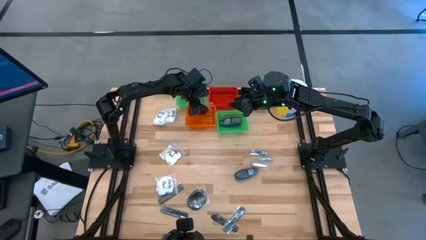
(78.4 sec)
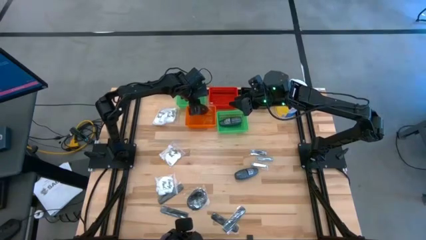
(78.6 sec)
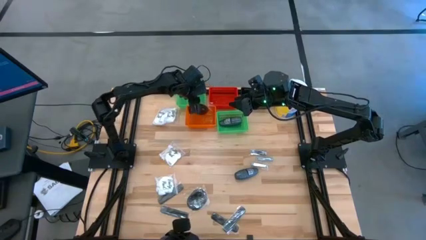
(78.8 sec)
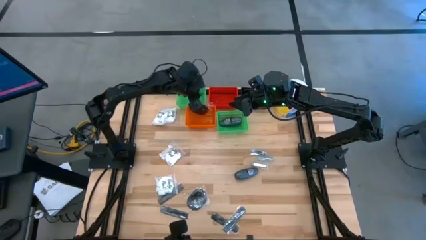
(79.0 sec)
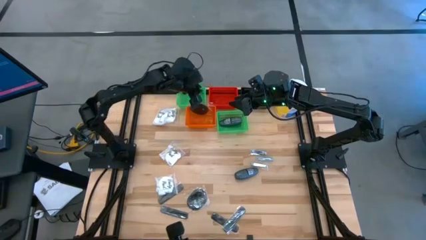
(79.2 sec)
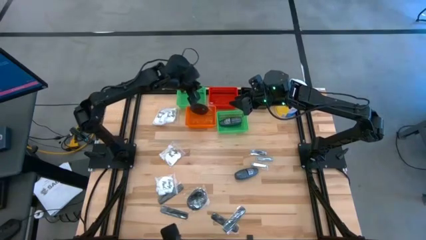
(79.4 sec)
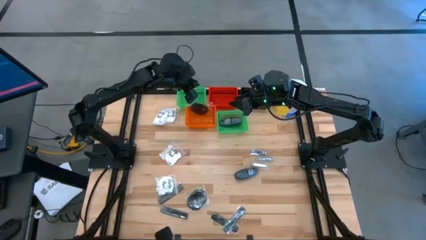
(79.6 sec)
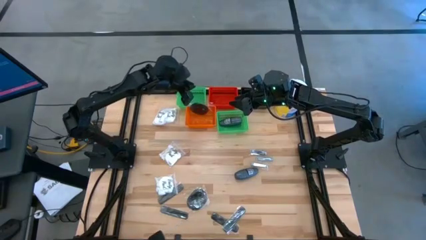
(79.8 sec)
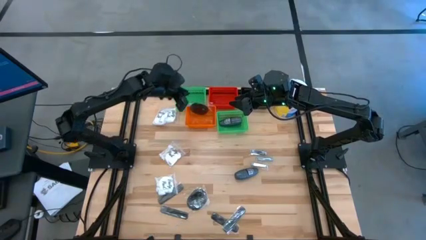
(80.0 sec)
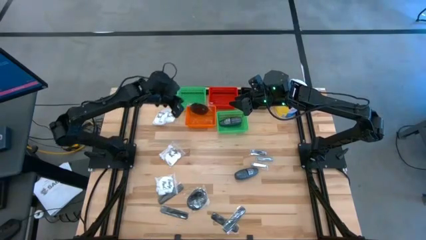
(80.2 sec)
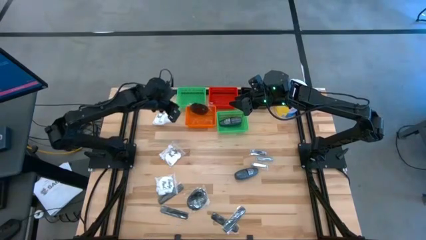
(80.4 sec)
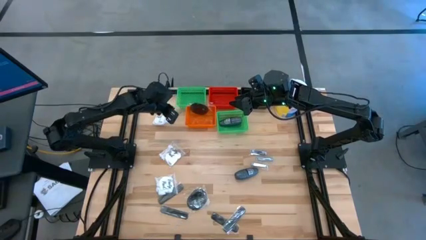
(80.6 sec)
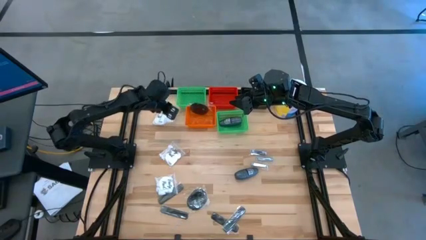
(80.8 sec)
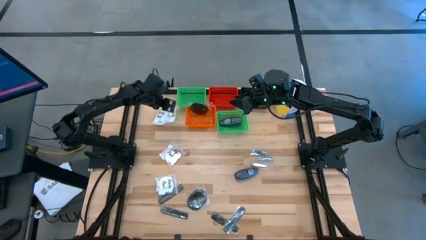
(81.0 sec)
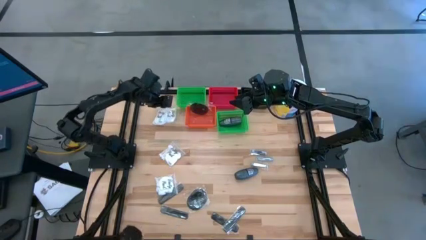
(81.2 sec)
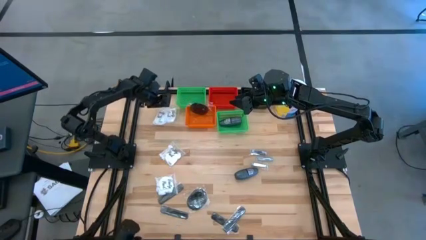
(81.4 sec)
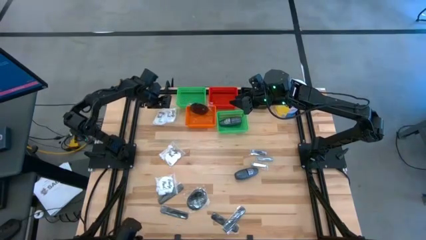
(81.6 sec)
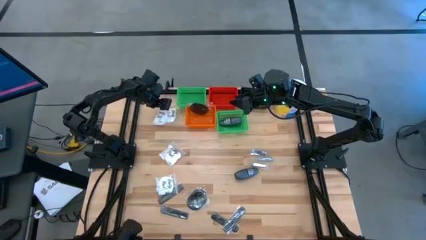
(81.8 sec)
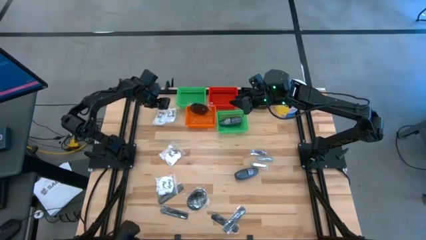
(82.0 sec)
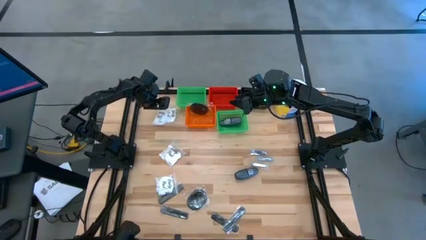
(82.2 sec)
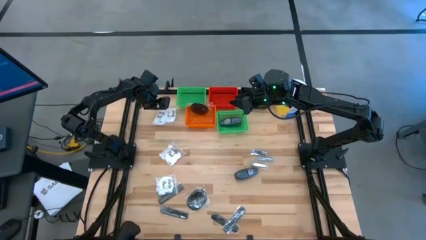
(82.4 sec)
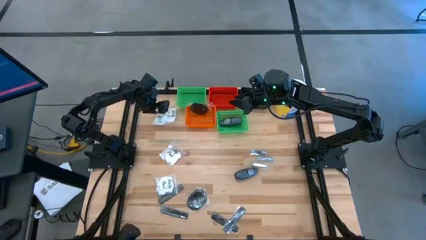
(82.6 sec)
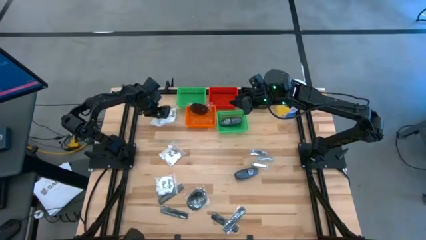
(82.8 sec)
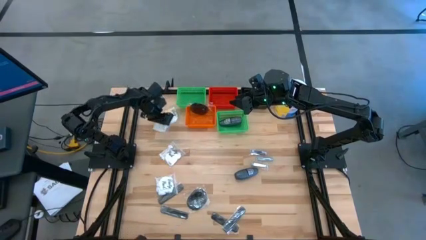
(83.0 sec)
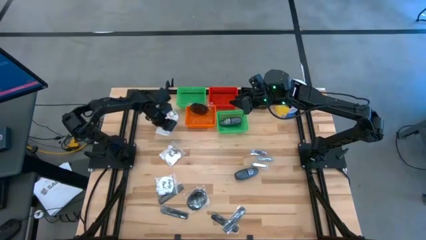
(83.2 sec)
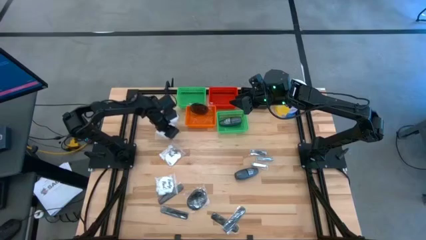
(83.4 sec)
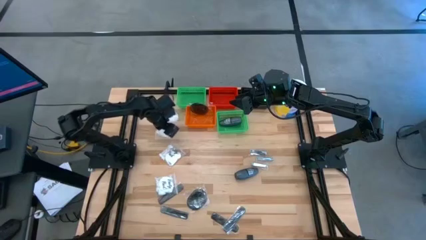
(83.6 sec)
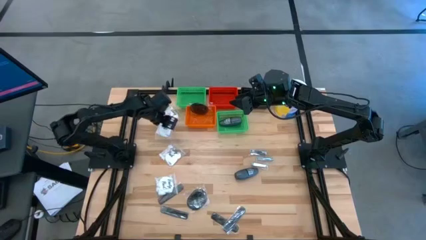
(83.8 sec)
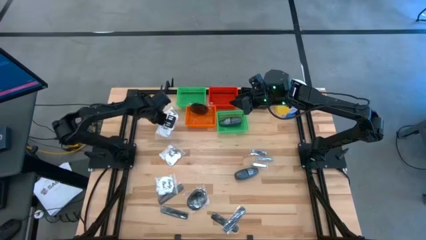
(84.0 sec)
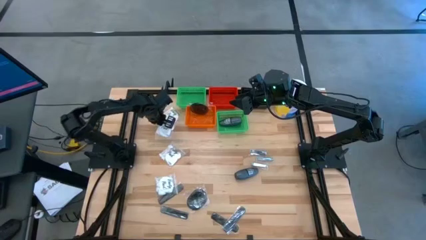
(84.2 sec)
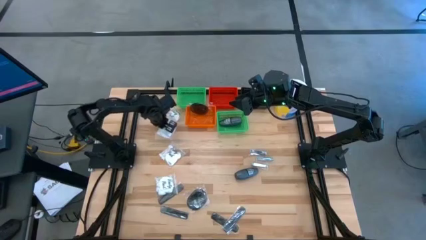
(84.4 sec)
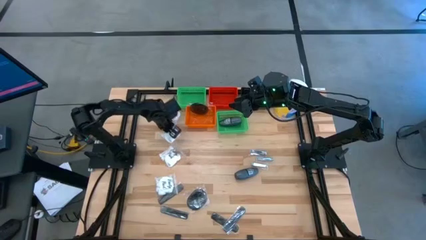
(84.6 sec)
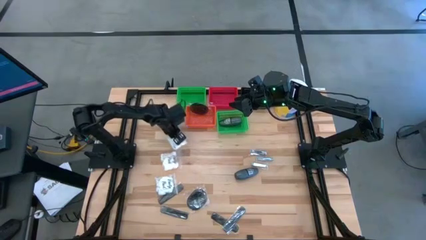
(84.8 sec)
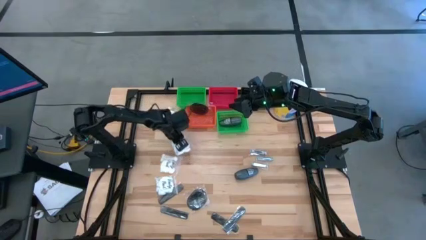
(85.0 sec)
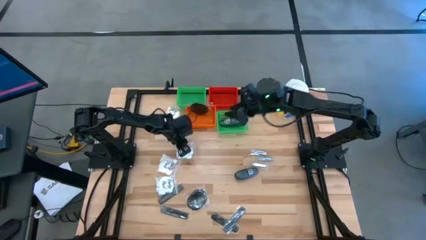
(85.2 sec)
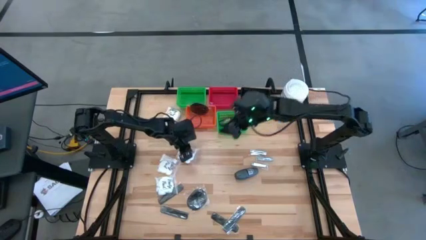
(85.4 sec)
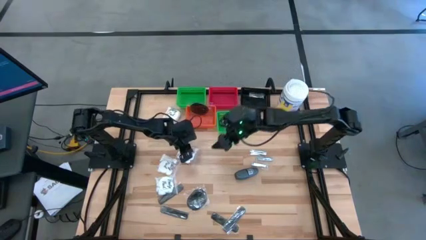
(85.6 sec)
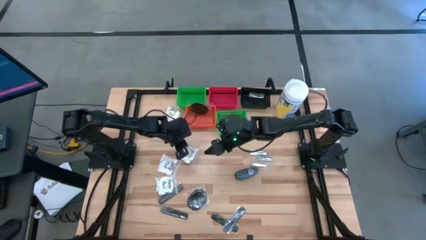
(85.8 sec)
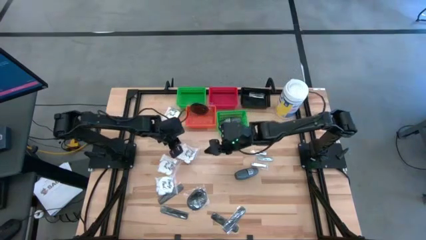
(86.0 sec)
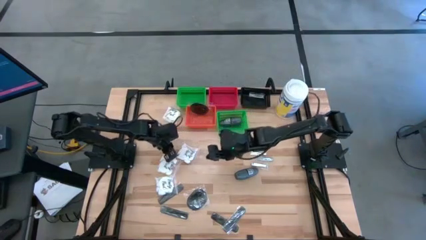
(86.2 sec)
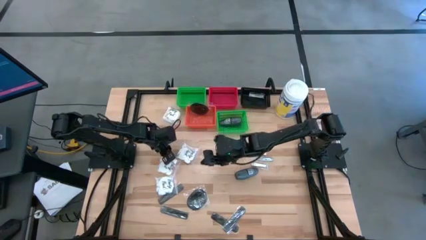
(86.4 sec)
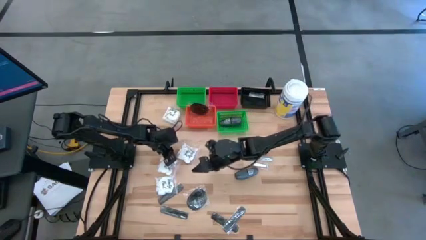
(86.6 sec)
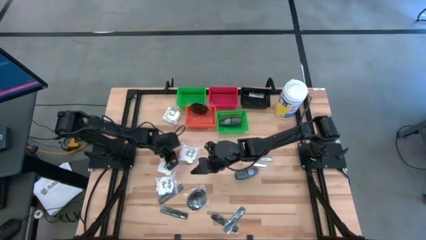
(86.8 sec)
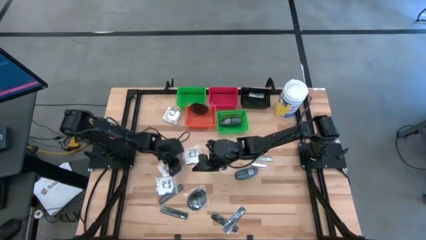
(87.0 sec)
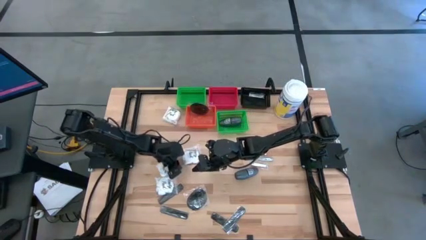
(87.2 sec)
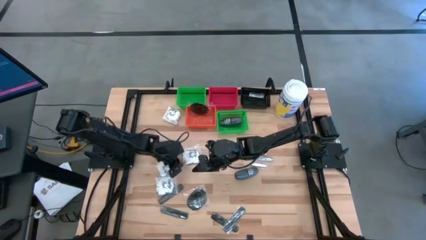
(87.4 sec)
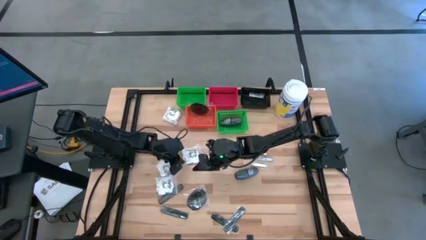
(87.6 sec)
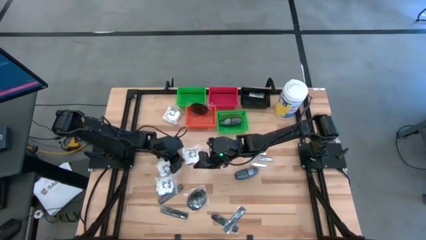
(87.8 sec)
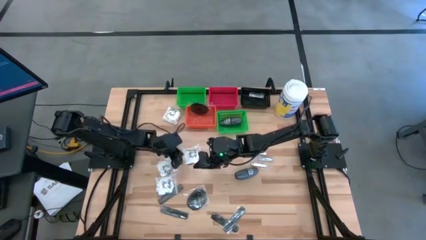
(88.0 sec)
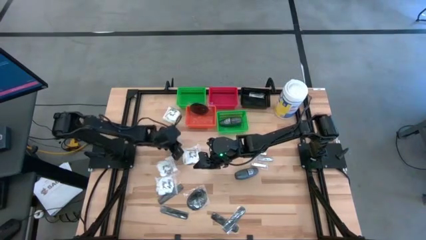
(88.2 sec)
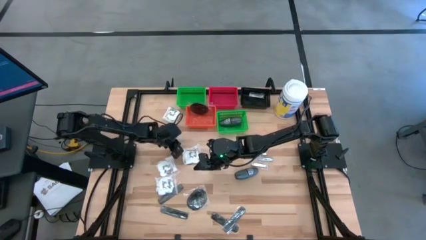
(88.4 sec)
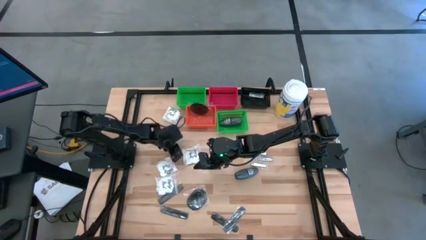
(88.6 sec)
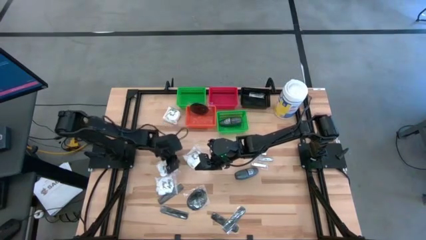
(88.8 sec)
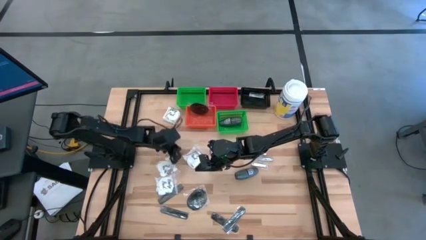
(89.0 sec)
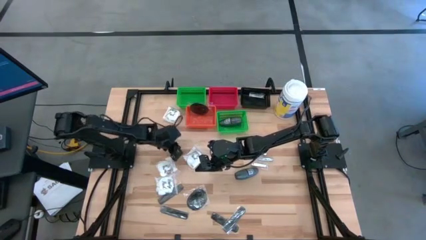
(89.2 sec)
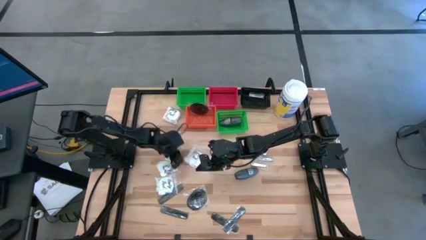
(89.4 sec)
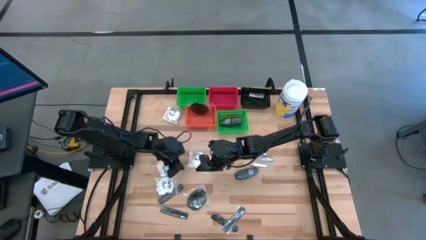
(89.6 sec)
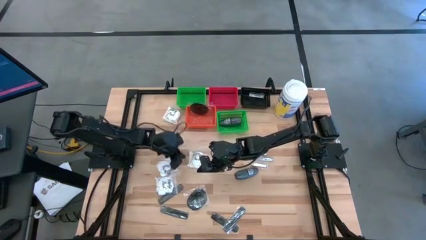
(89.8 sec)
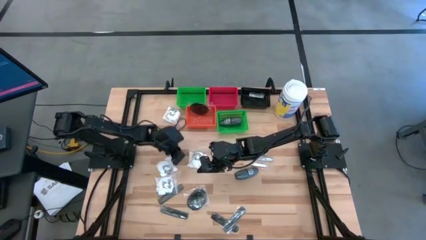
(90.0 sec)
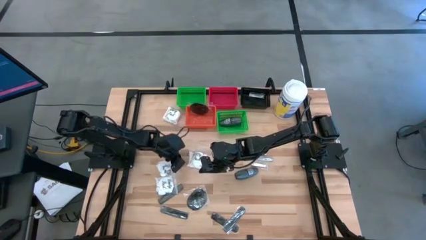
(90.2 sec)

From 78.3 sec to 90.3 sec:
Task: Pick & Place Travel size toiletries
Put the vanity pack into the green bin

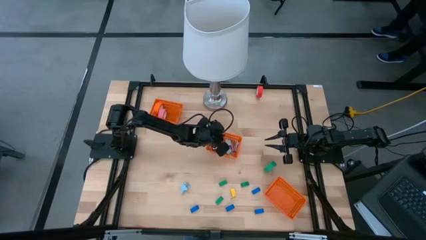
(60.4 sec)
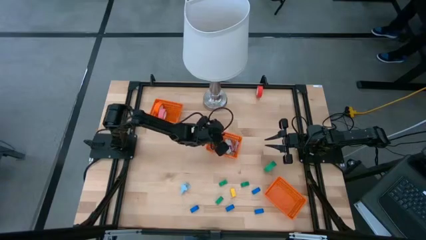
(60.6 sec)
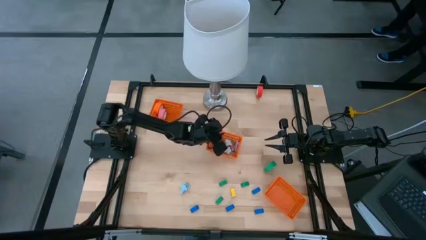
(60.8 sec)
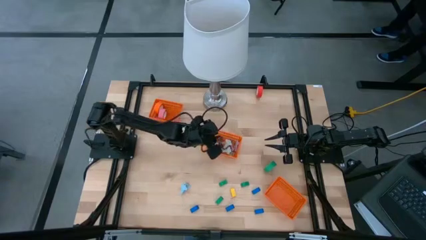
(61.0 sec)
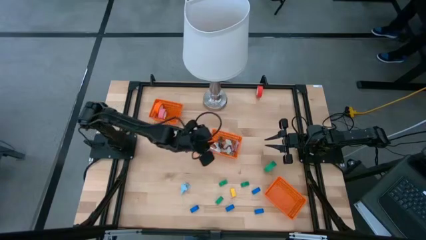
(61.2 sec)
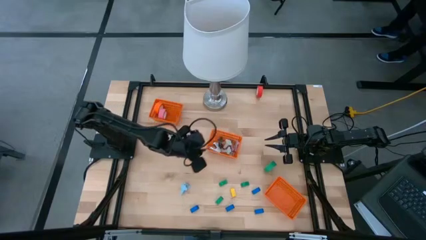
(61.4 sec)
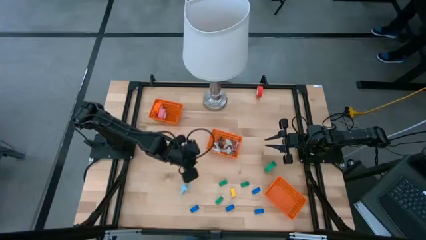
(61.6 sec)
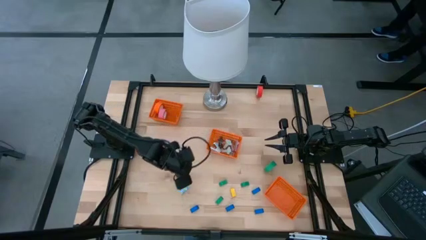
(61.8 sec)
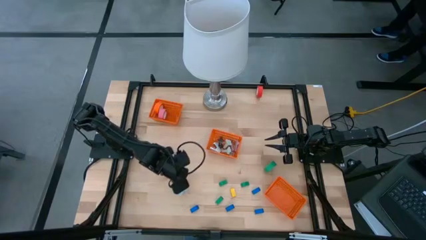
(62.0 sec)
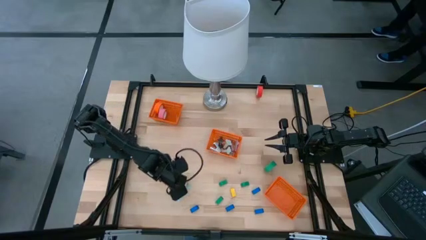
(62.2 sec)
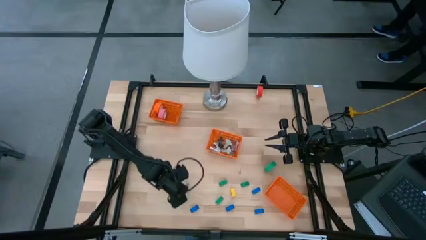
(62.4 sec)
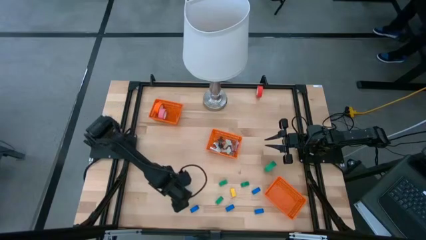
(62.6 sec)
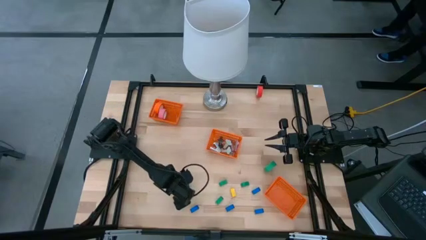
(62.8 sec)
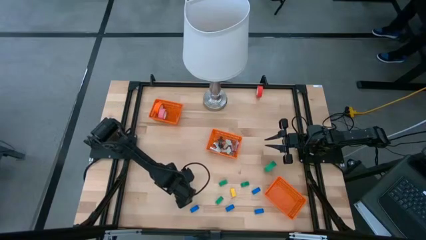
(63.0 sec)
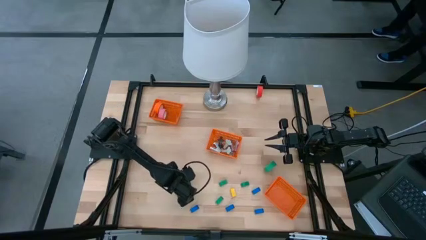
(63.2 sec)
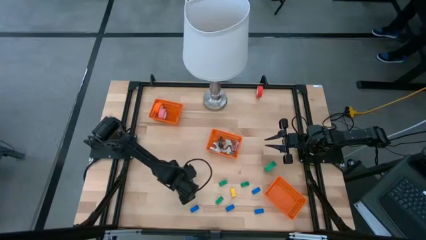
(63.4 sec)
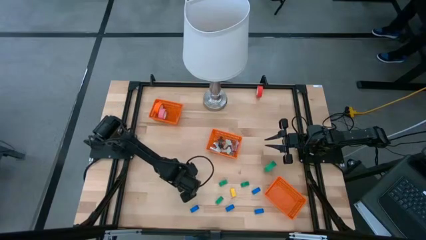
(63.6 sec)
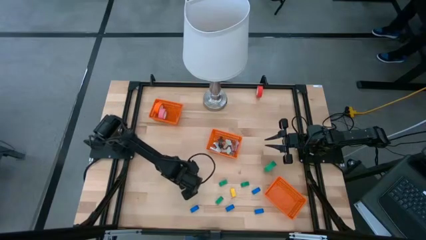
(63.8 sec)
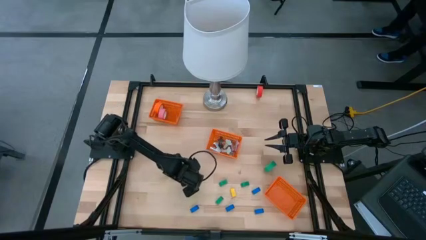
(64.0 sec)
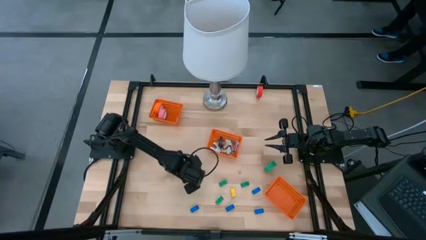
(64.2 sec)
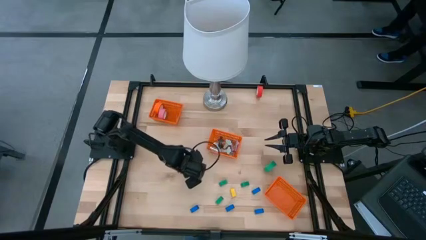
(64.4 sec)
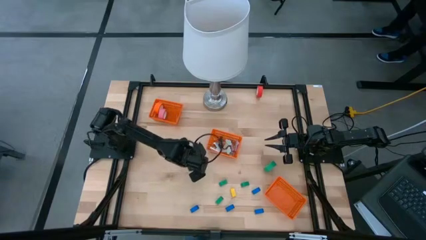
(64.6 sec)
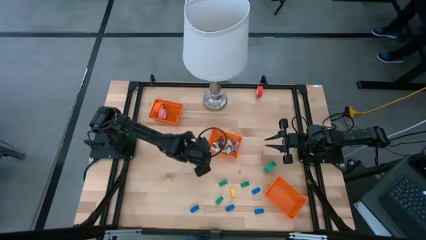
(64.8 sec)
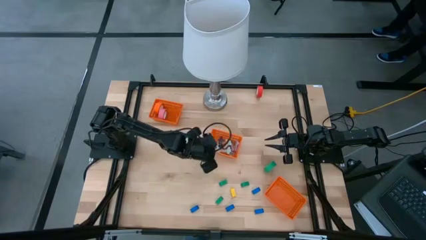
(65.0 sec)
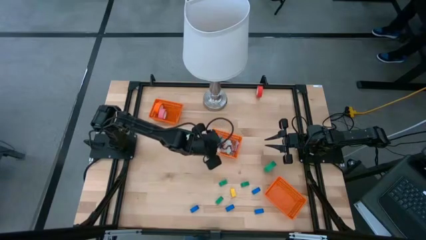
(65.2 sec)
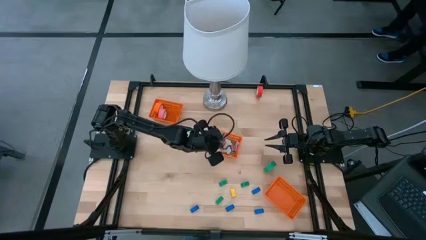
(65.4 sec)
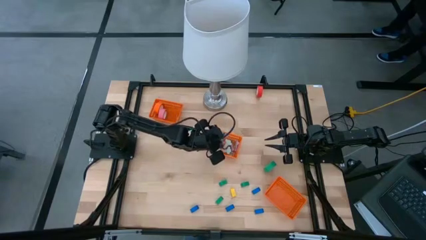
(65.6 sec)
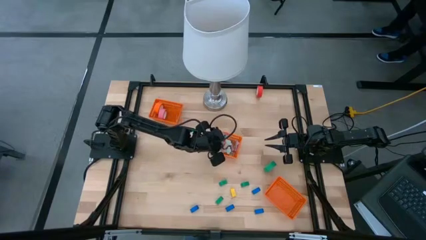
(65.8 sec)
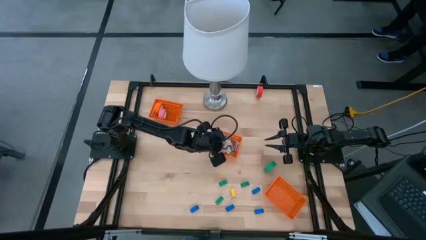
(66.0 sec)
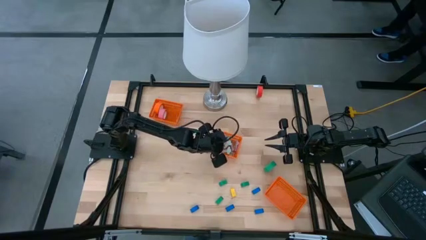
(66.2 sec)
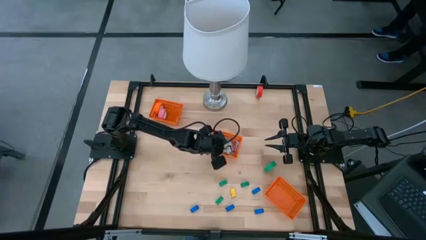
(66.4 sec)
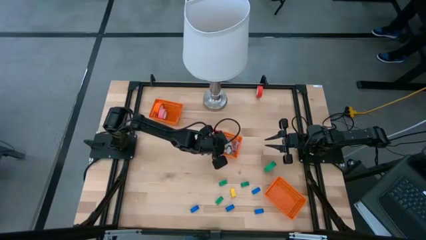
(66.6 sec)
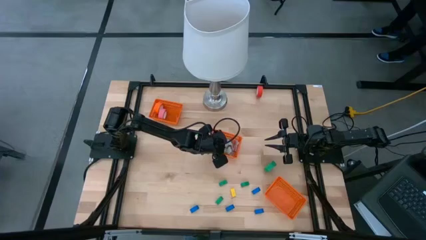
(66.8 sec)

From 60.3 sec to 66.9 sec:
Task: Pick and place Stapler, Stapler remover, tape
Put the blue staple remover into the middle orange bin
